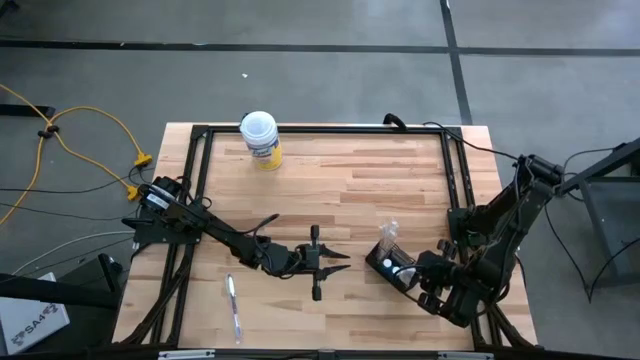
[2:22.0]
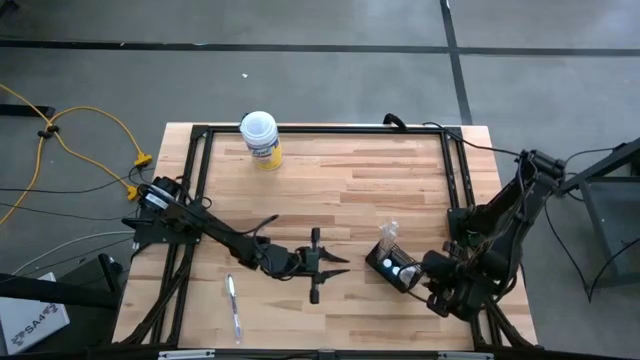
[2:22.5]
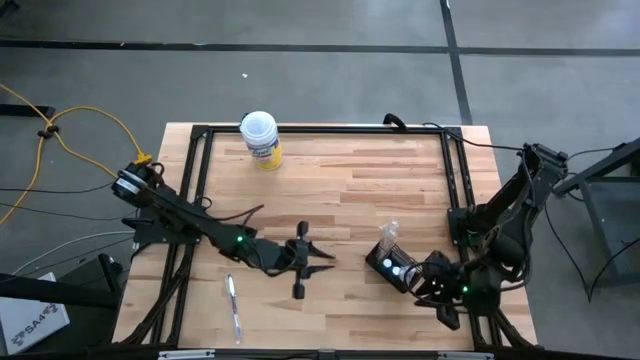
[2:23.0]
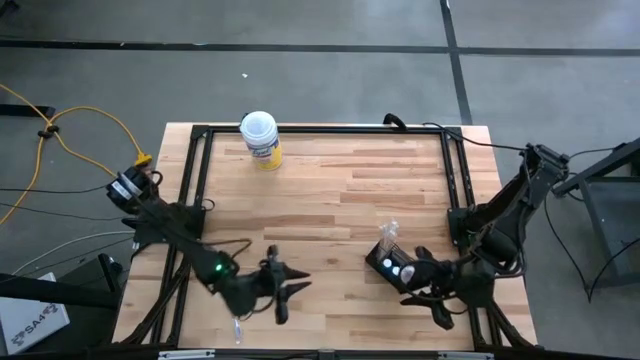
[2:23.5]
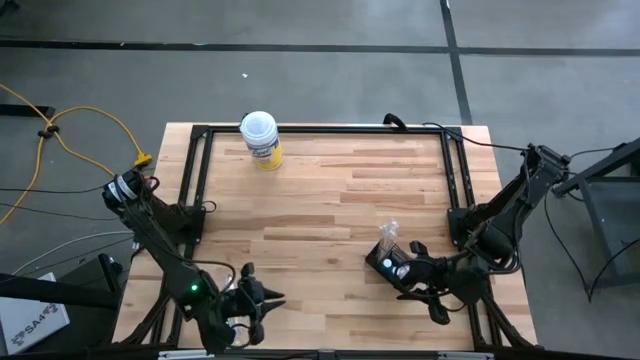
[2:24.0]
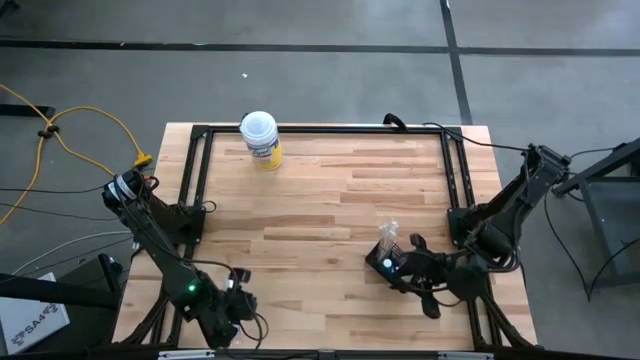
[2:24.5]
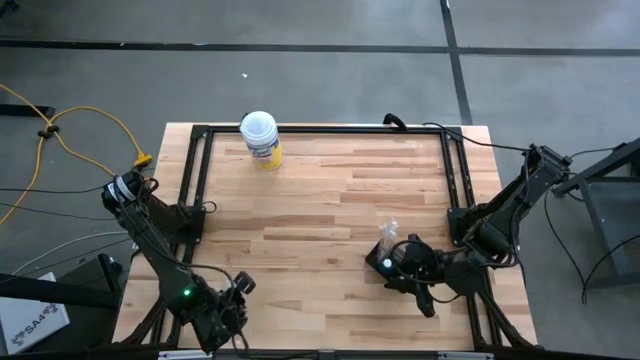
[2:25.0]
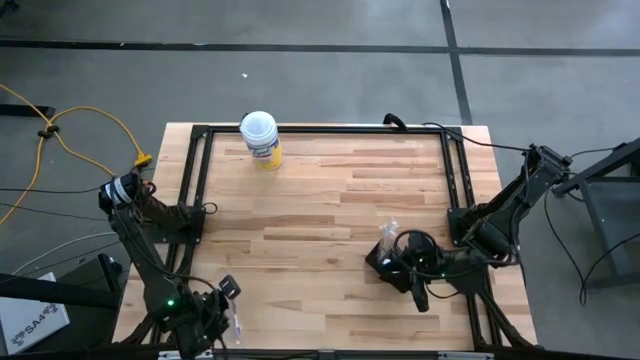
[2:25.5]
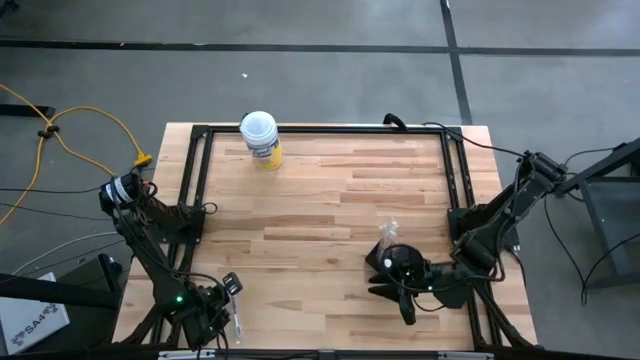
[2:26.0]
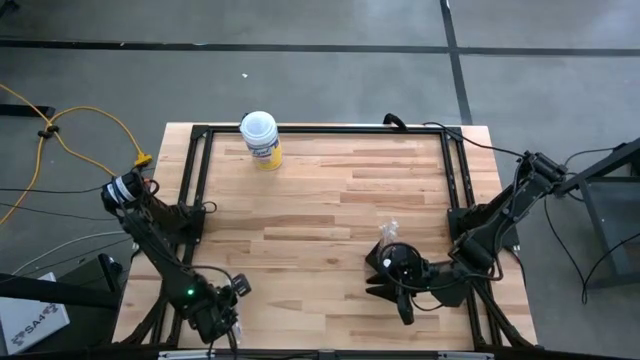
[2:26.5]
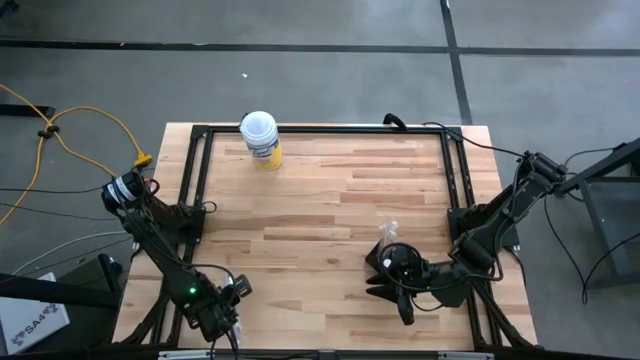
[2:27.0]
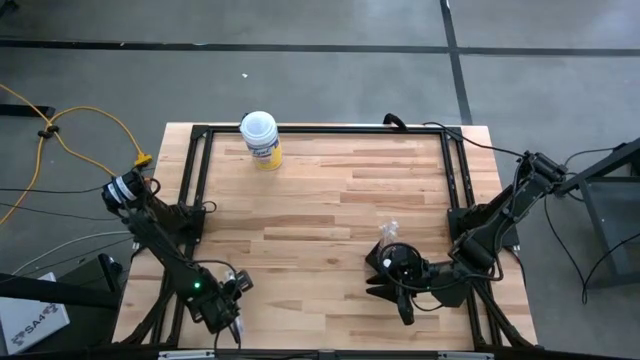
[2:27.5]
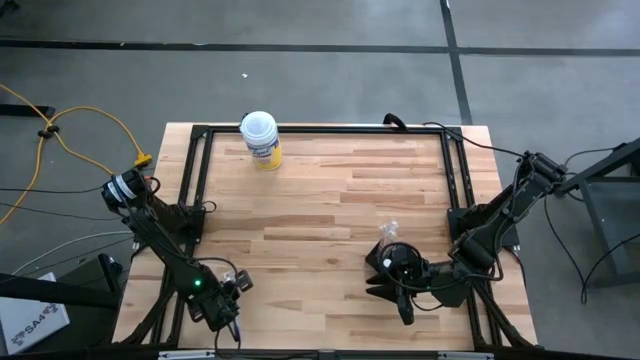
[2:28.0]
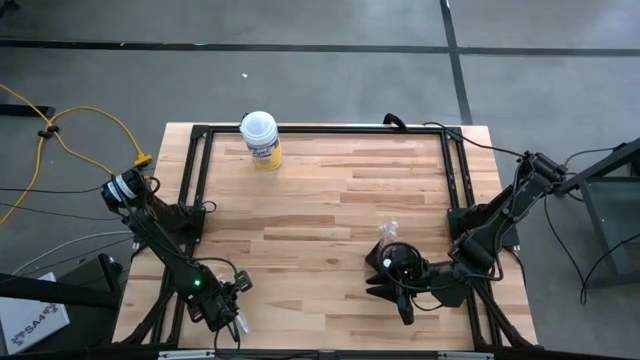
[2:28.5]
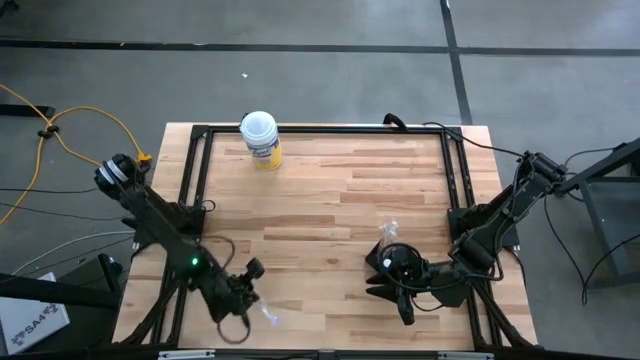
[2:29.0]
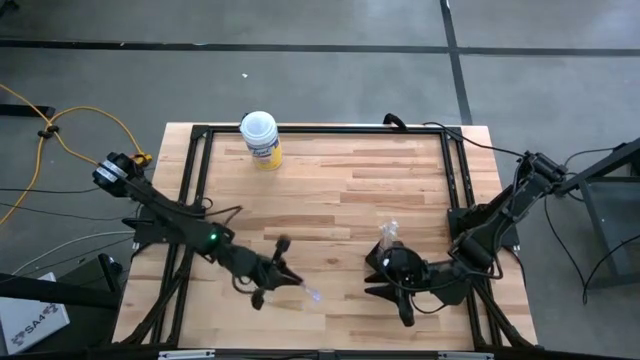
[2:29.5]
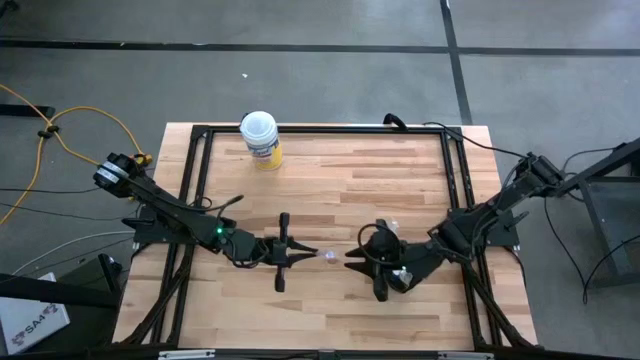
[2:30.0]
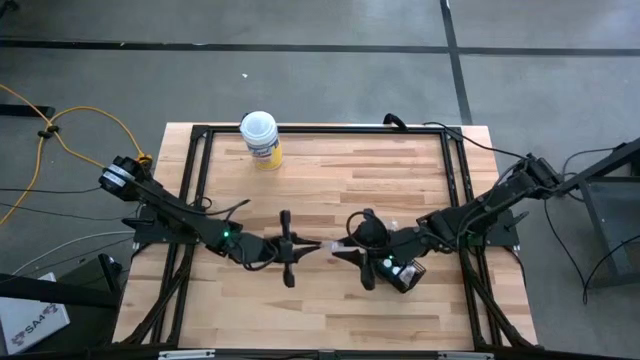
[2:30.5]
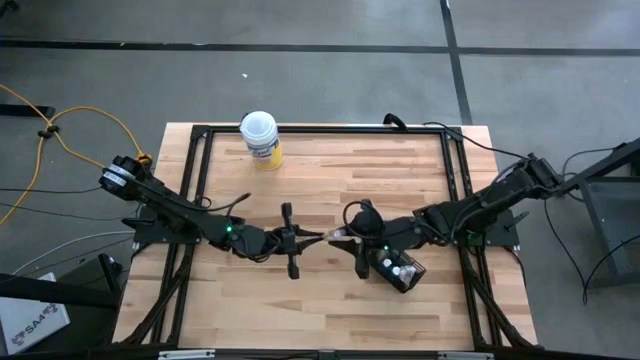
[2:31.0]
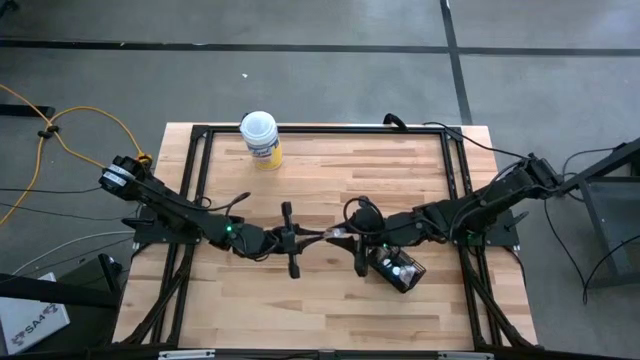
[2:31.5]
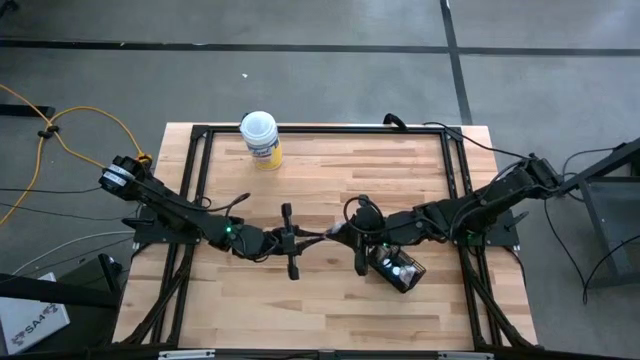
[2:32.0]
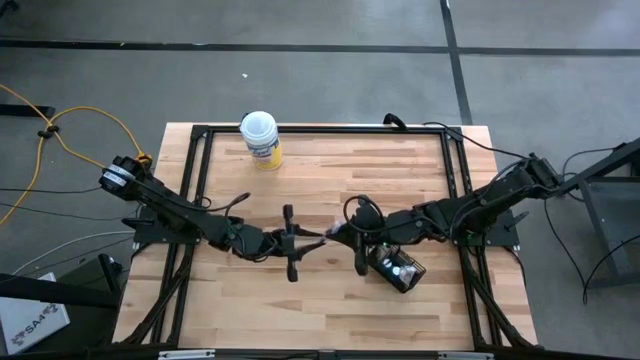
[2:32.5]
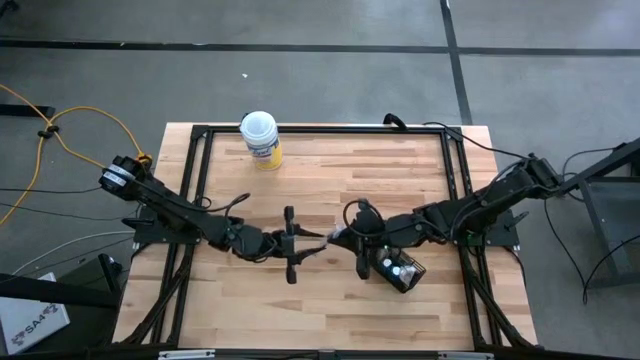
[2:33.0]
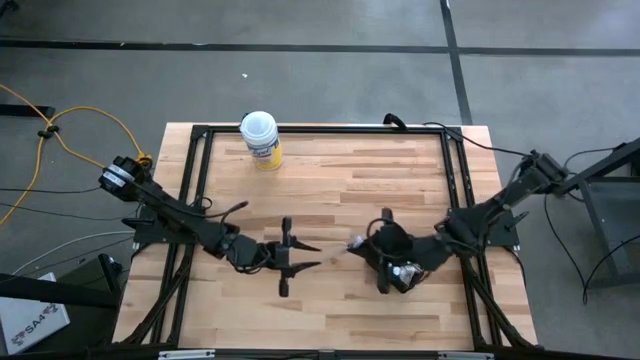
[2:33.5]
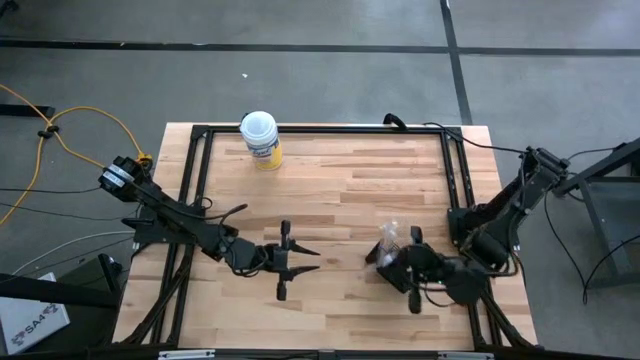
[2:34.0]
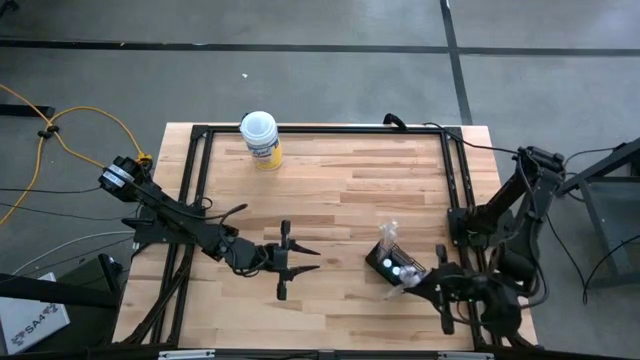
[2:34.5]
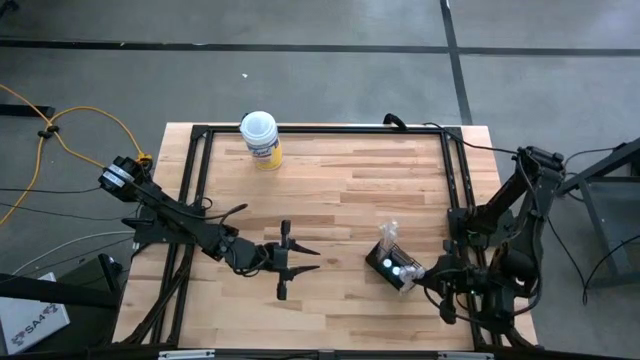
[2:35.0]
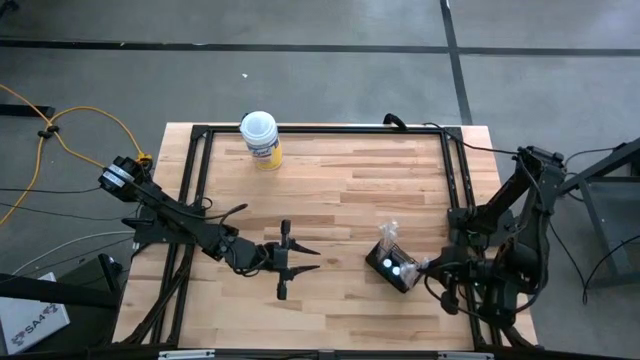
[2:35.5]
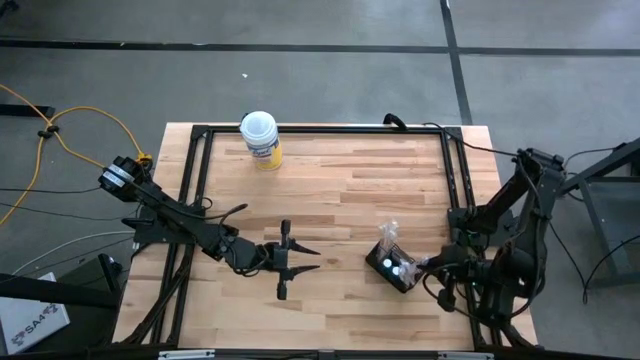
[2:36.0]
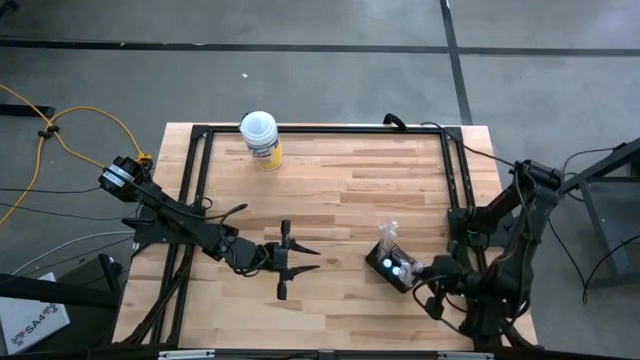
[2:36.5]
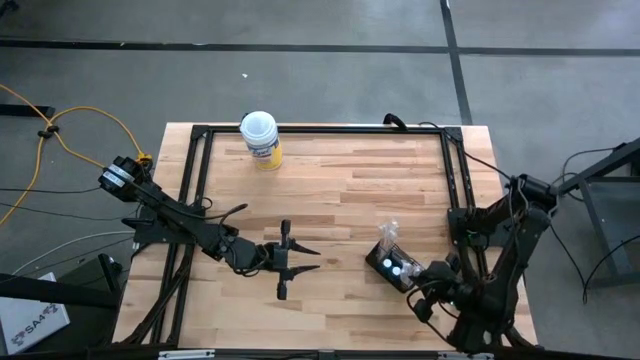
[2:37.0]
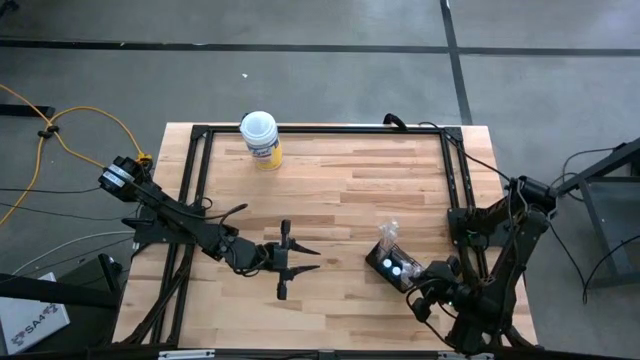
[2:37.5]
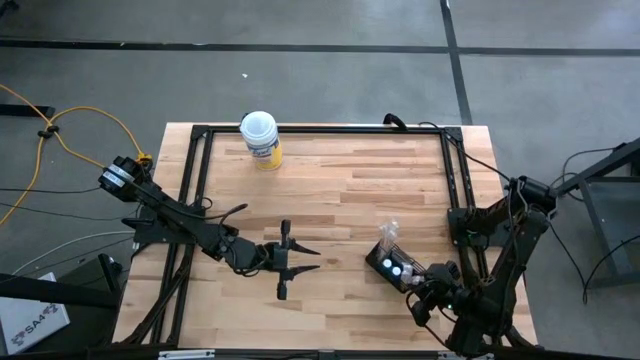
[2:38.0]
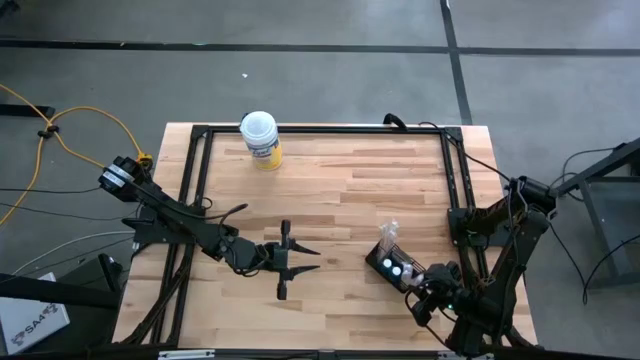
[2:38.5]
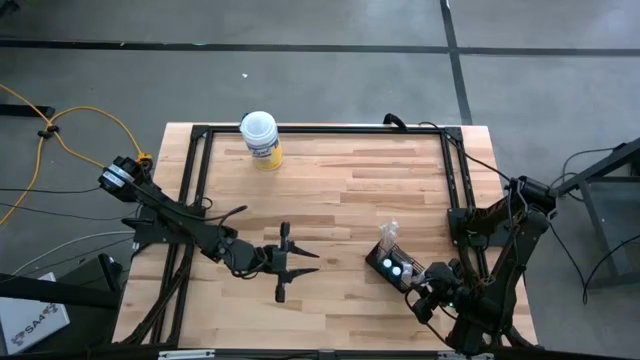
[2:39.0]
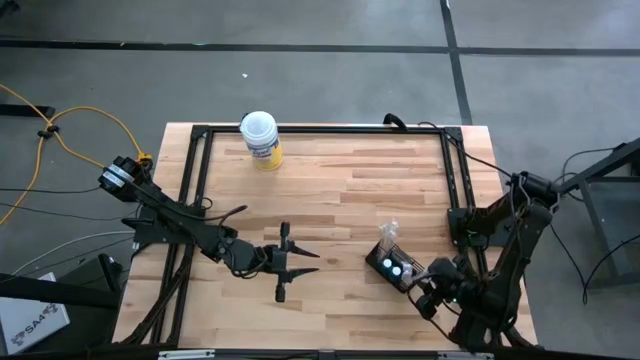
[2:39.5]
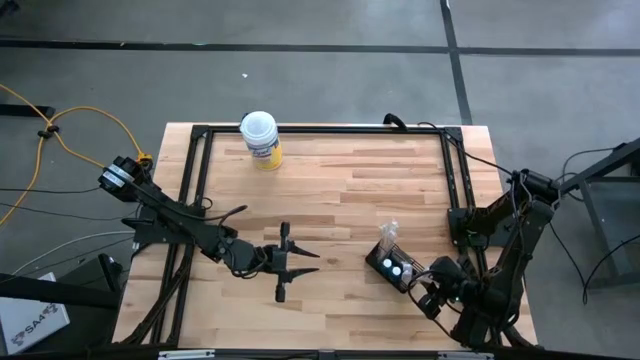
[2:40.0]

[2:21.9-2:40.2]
Task: Pick & Place toothbrushing station
Put the purple toothbrush into the wire organizer
